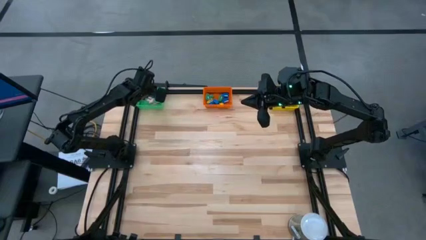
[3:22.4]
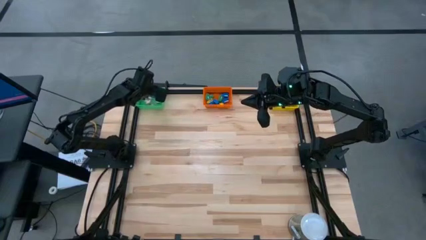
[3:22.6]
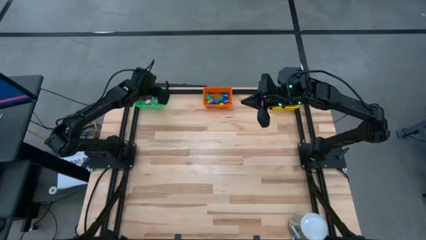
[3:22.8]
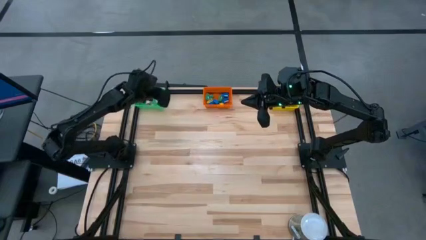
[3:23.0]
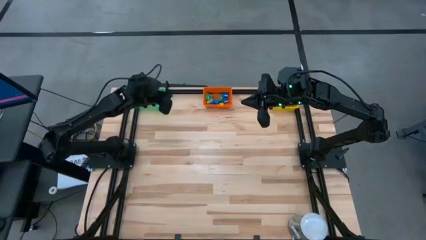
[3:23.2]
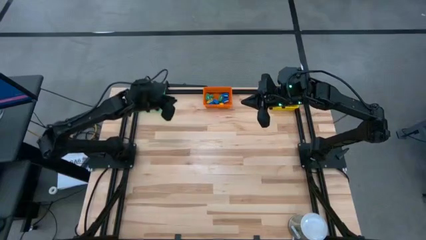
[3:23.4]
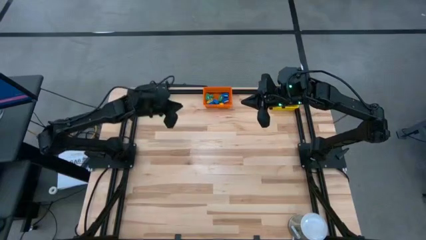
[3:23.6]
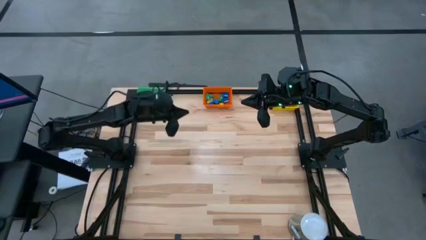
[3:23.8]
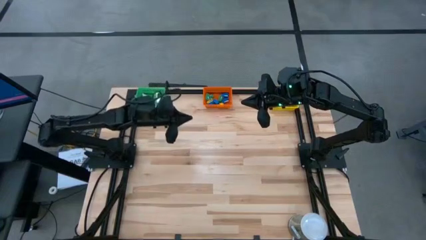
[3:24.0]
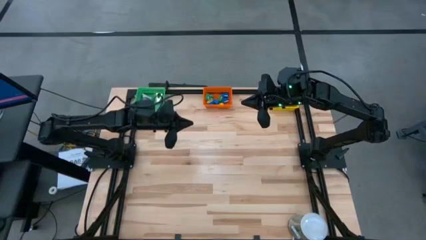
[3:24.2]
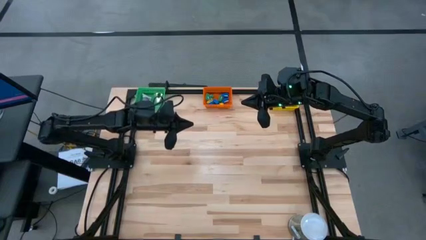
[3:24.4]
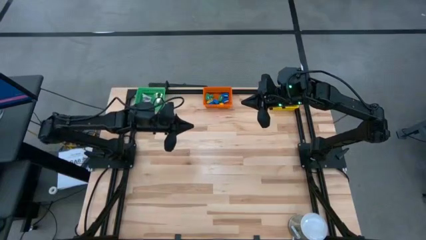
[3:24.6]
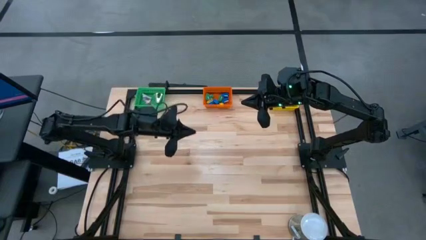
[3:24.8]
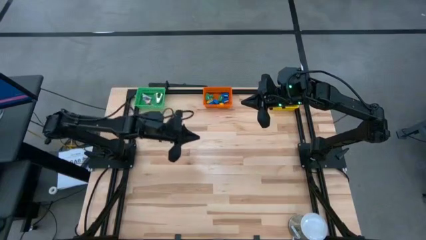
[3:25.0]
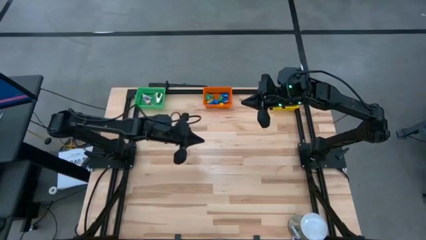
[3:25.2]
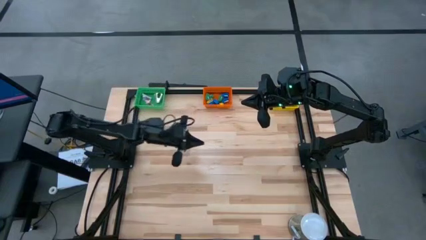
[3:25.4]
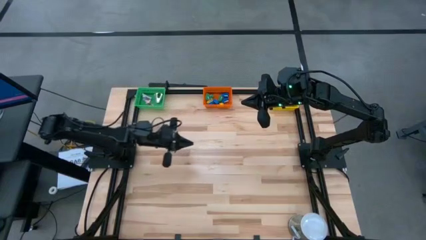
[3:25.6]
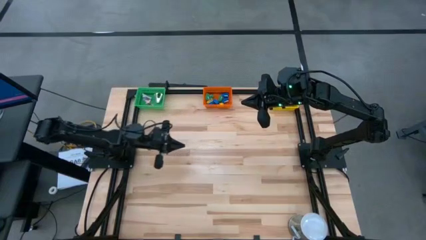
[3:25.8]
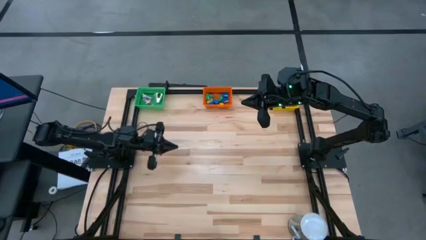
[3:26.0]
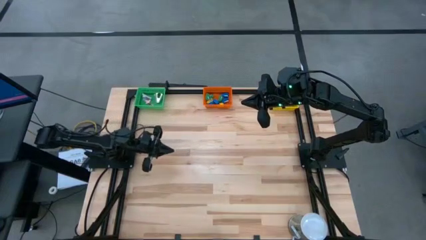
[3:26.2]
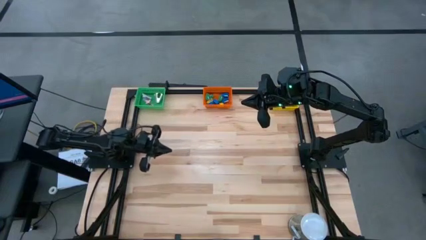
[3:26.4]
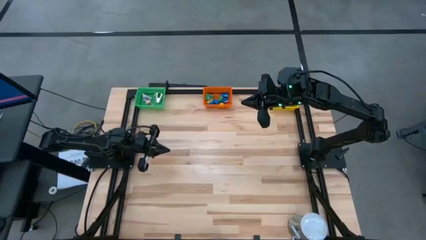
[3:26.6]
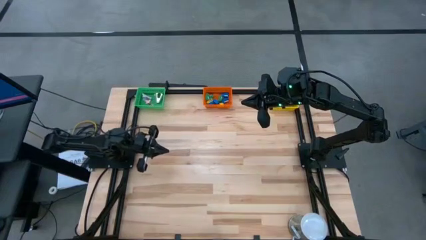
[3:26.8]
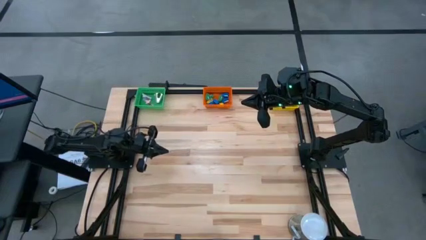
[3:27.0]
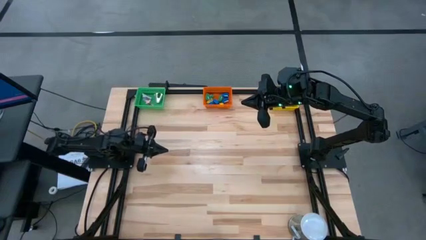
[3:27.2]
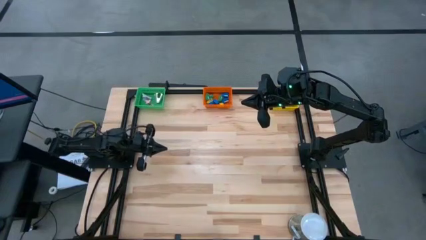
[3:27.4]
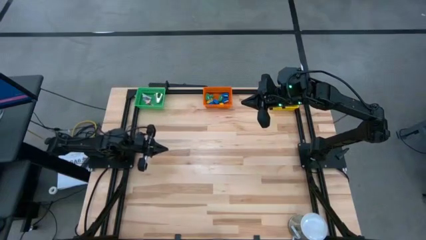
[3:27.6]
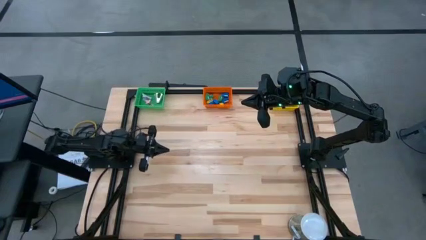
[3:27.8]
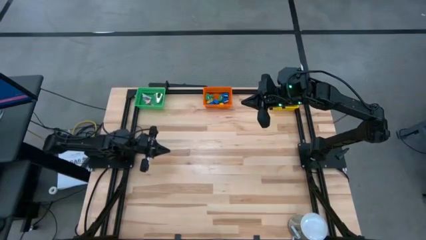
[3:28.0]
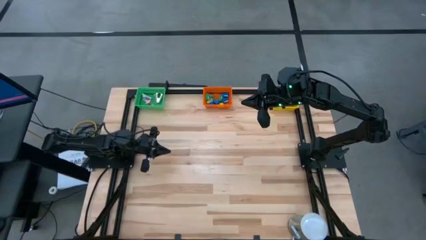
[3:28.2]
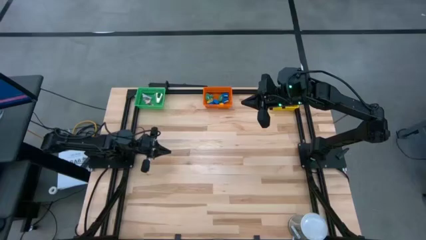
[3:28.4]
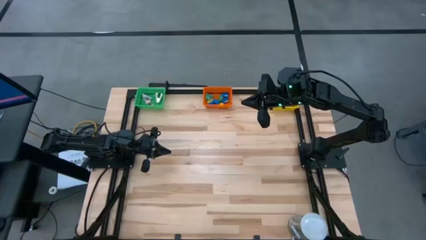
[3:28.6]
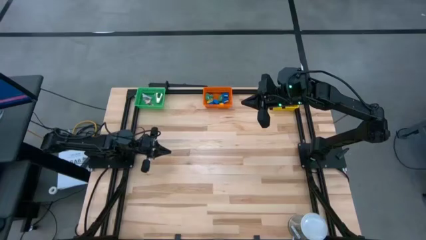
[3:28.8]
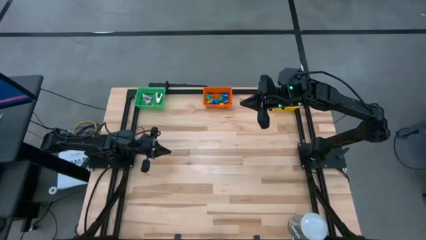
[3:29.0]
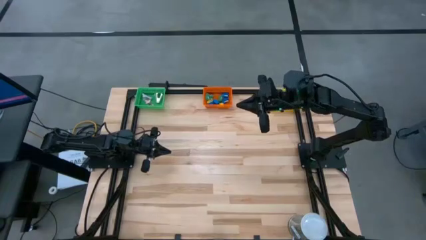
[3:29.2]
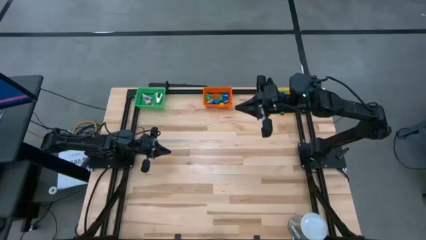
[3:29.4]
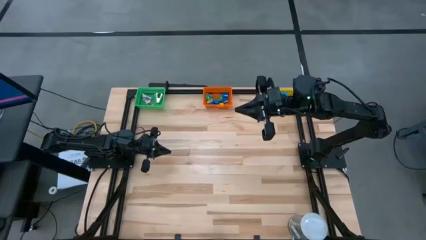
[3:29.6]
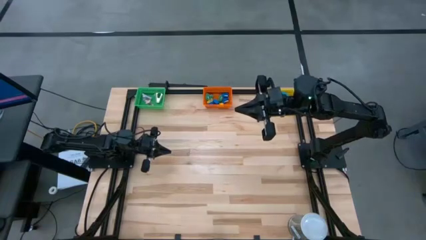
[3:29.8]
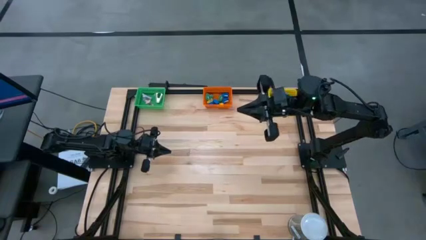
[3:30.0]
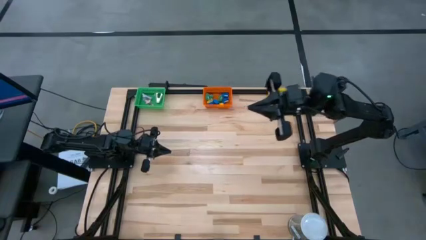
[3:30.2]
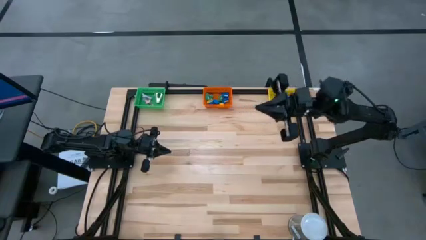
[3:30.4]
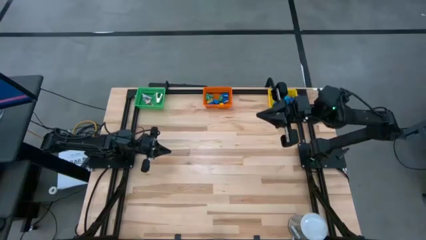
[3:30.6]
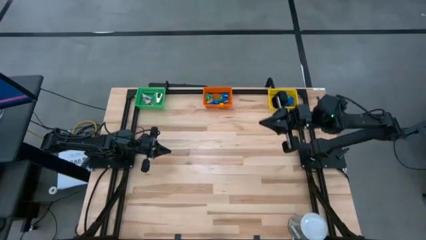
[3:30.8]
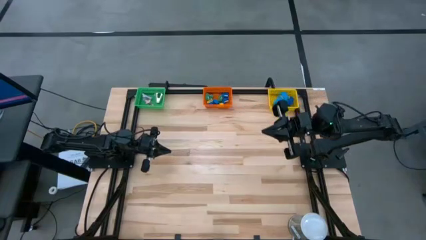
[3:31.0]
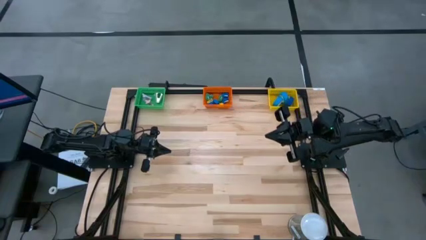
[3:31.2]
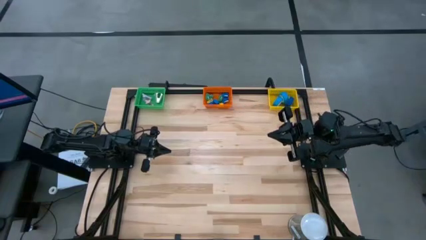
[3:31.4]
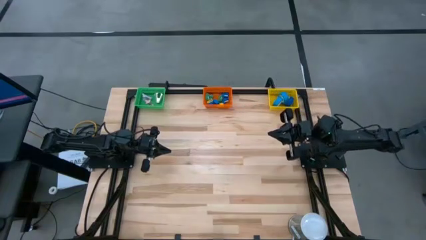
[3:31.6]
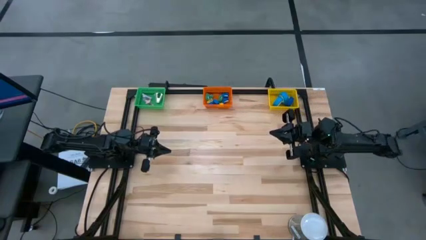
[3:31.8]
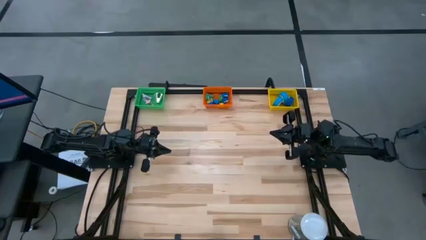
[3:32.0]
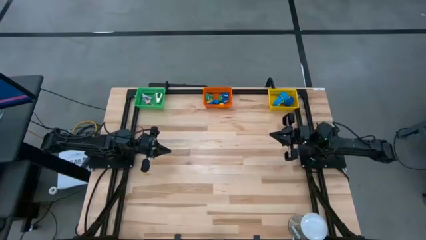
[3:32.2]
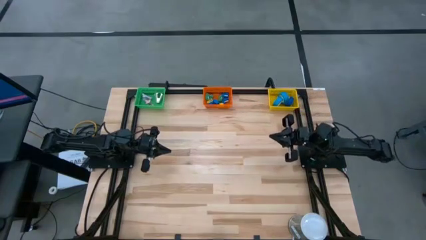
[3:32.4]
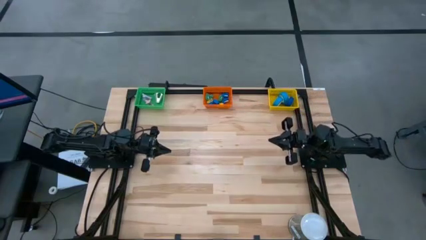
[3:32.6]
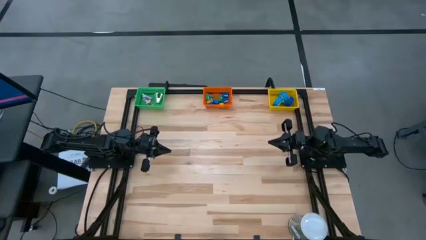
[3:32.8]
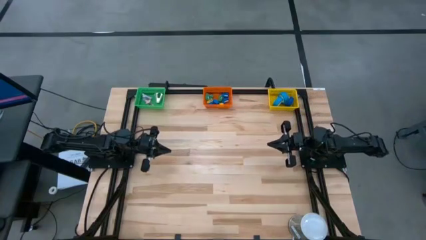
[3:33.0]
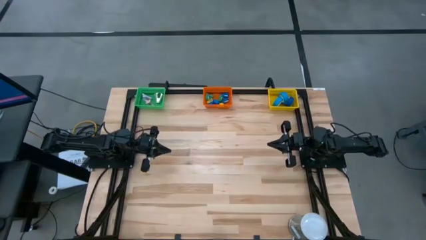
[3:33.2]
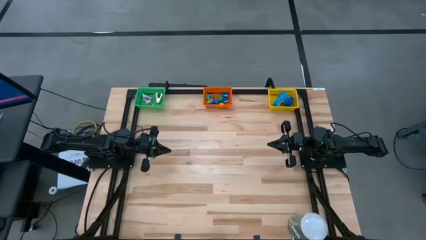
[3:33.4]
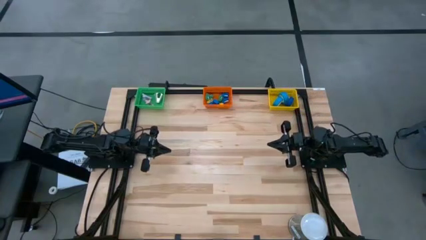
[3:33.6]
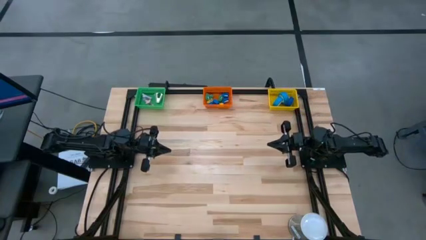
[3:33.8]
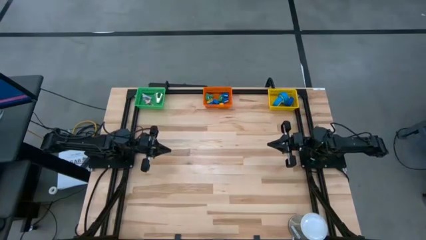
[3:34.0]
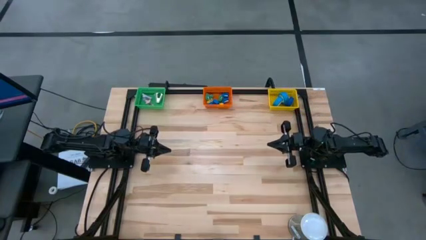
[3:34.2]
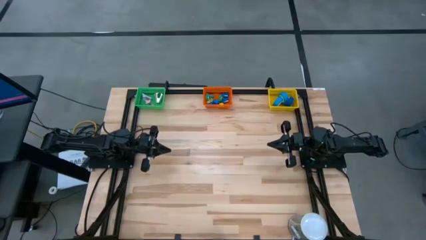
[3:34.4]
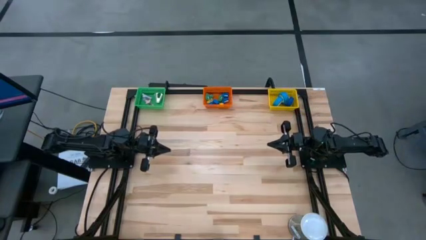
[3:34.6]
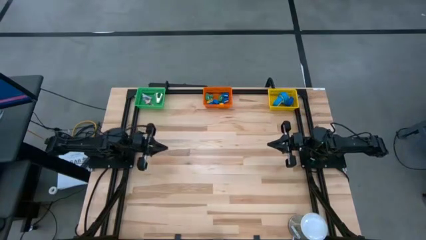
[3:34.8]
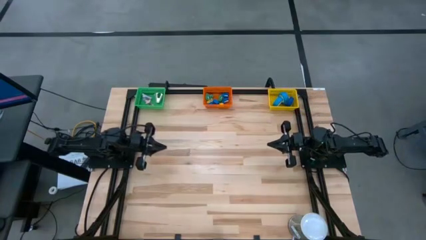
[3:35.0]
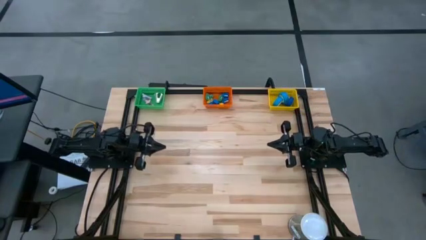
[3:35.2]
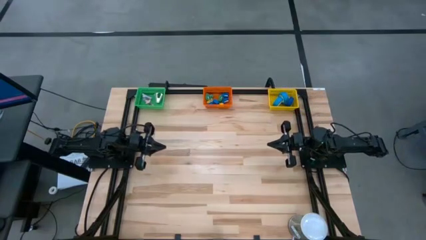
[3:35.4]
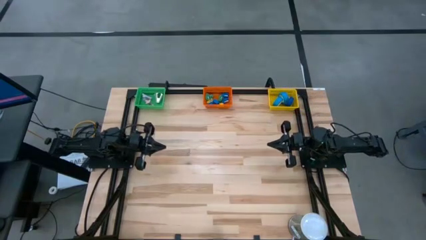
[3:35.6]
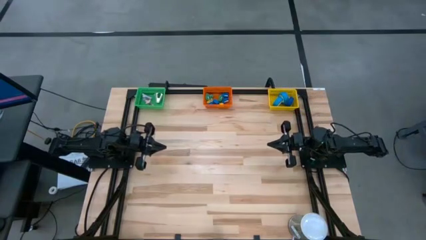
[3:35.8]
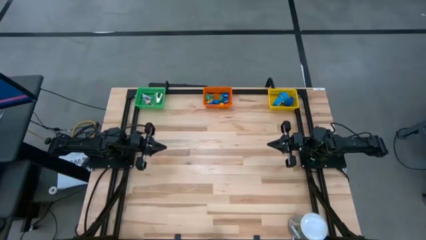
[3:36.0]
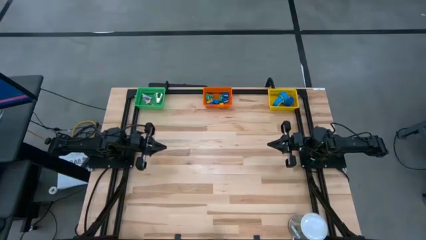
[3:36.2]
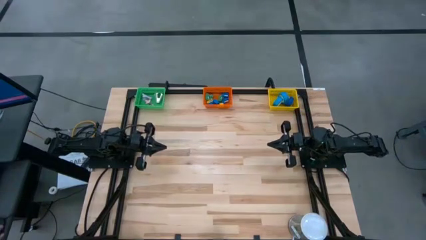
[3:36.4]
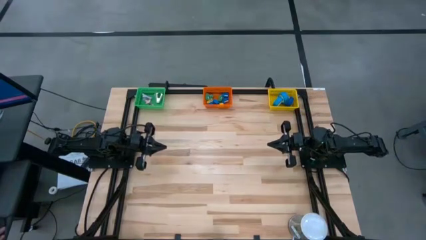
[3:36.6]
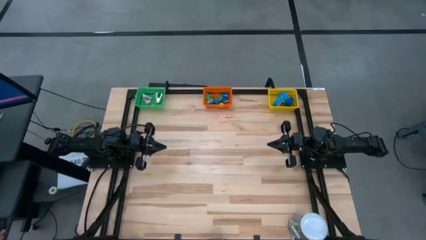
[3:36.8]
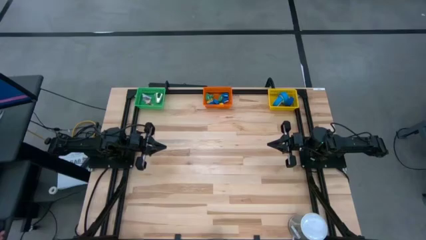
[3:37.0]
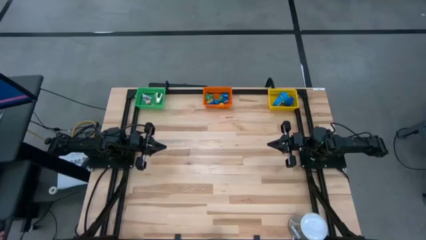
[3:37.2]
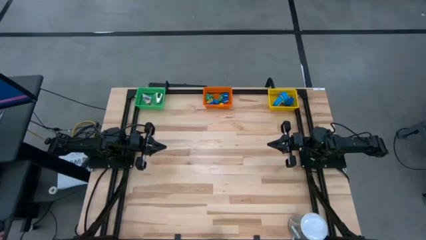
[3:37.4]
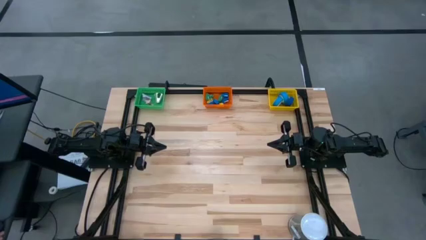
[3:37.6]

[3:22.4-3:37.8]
Task: Pick and place Stapler, Stapler remover, tape
Return to Home Position

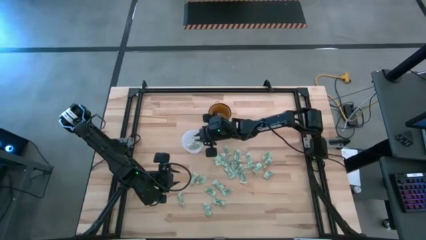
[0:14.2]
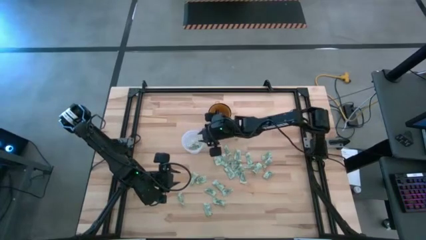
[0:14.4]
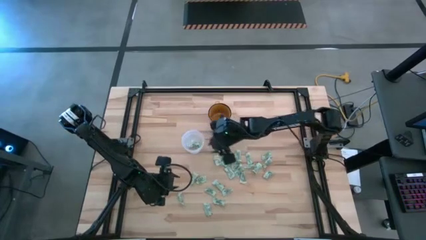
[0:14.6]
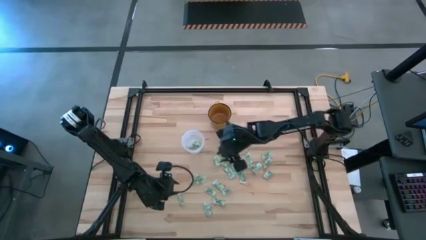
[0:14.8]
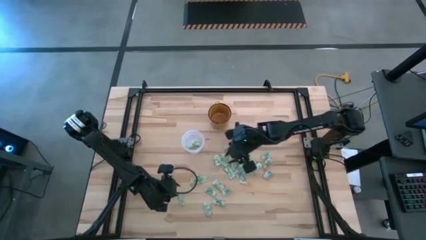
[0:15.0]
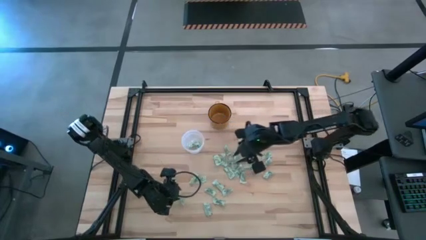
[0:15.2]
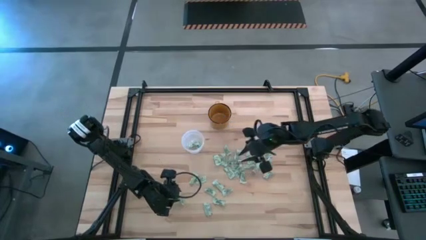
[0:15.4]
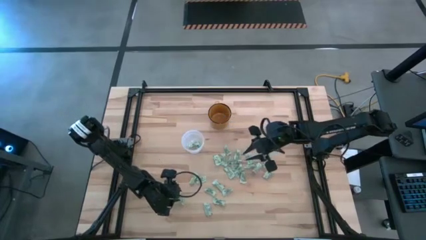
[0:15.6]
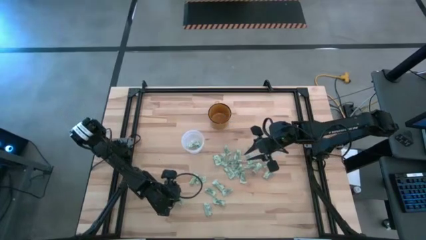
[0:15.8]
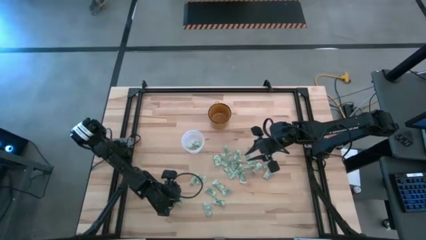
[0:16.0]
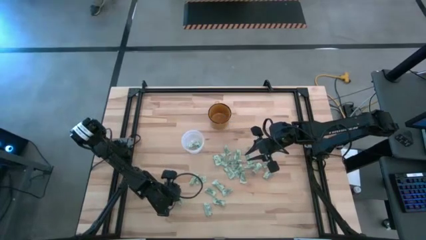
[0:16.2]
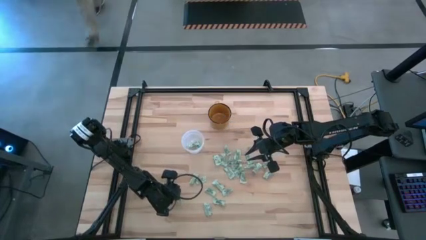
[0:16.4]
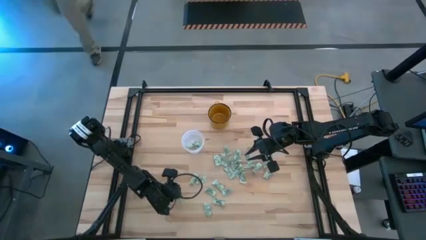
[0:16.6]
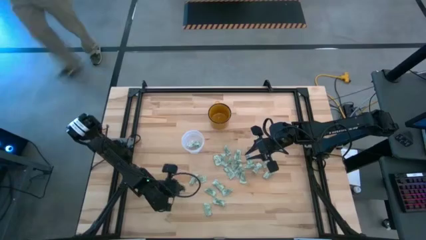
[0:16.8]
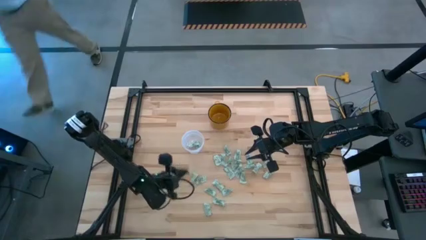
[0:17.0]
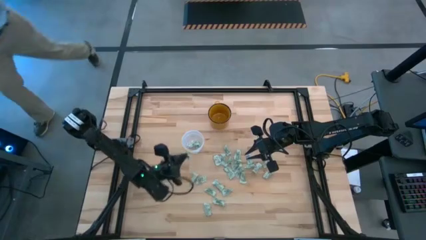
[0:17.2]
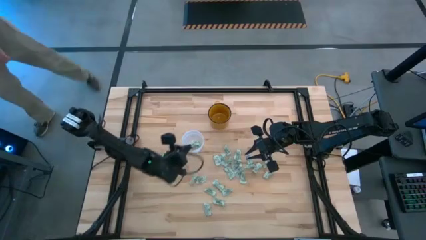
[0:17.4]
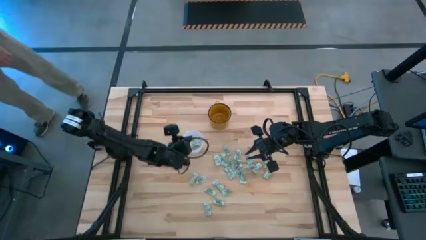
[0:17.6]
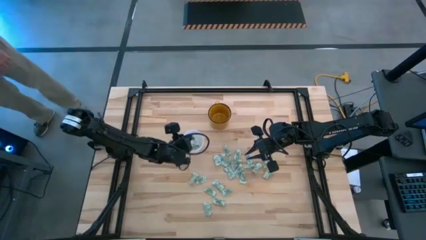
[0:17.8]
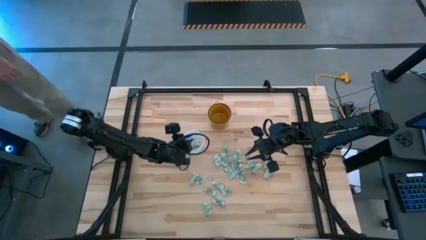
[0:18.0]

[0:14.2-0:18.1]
Task: Pick and place Stevia / Truvia into bins
Put the stevia packet into the transparent bin
